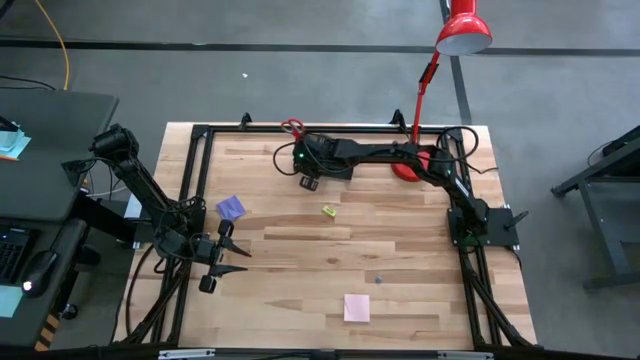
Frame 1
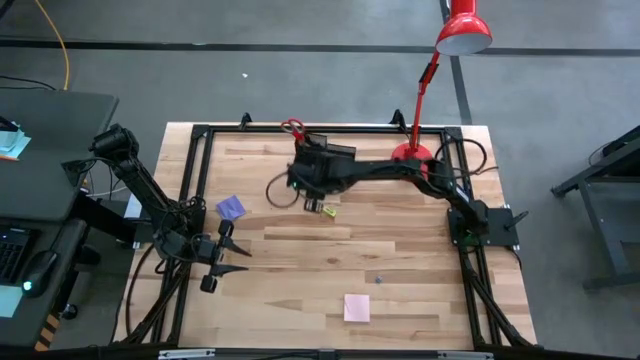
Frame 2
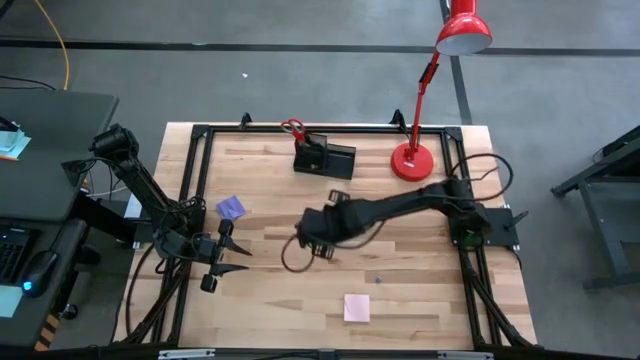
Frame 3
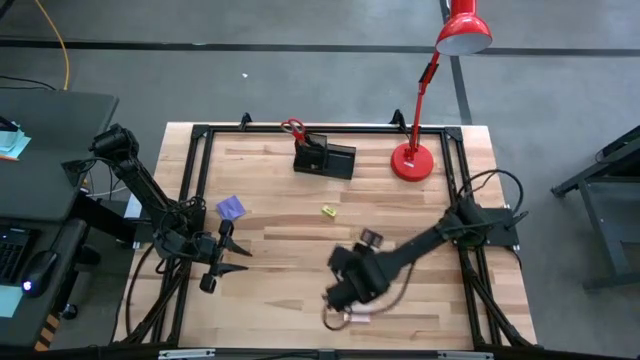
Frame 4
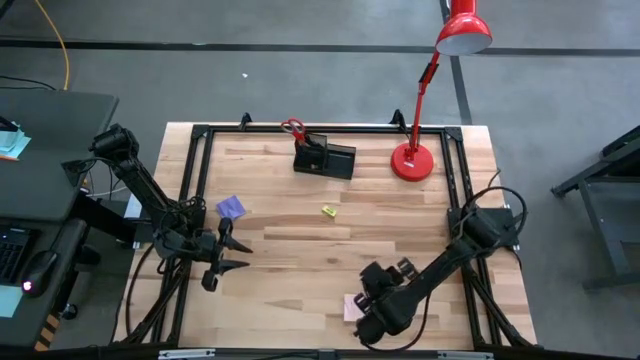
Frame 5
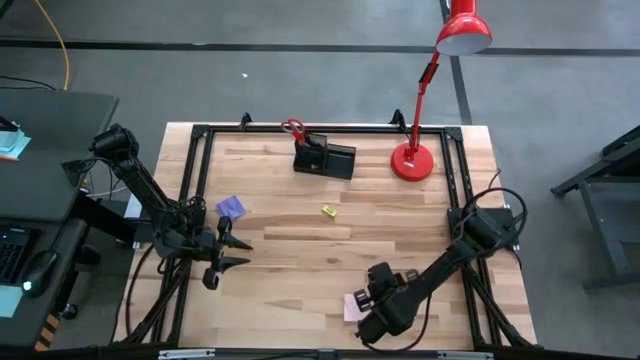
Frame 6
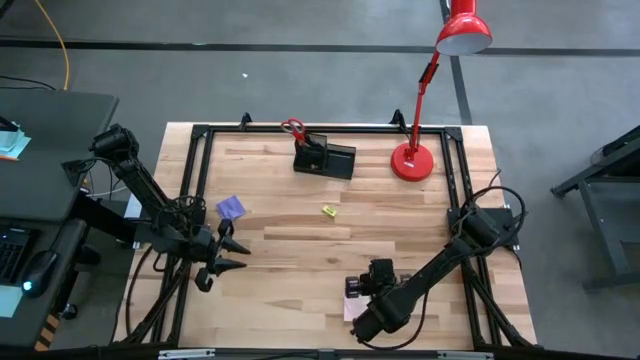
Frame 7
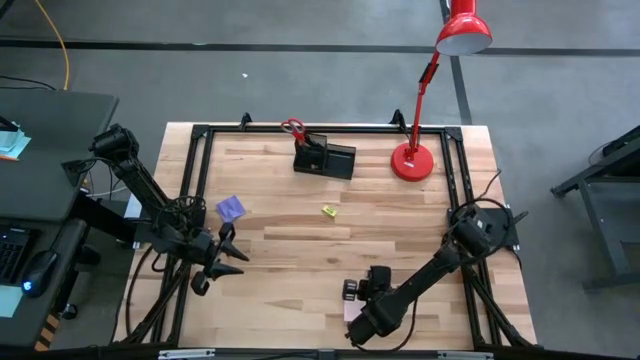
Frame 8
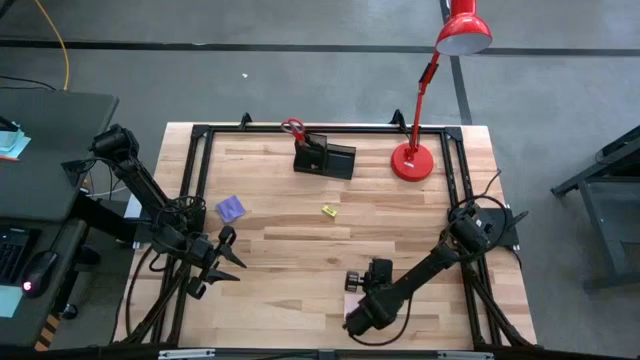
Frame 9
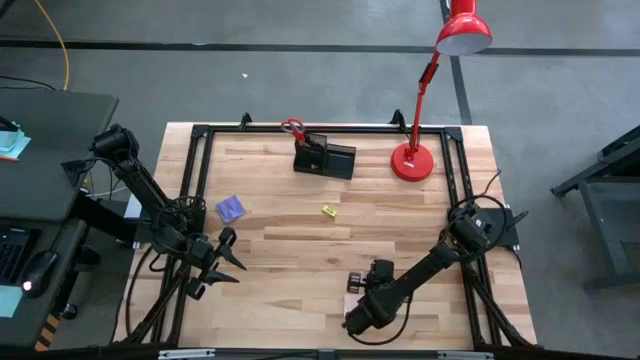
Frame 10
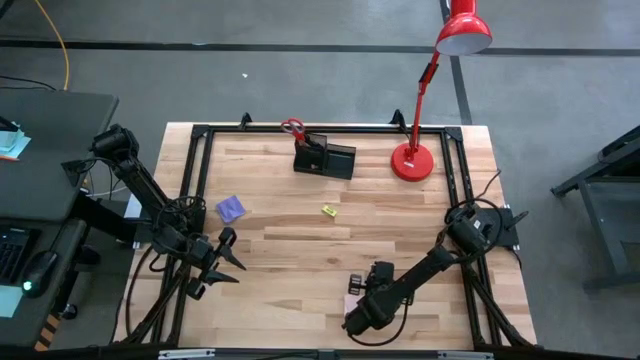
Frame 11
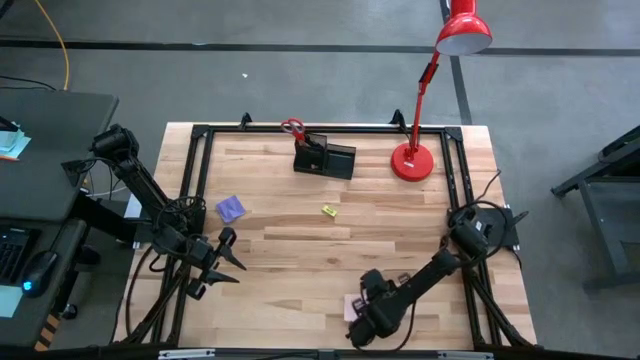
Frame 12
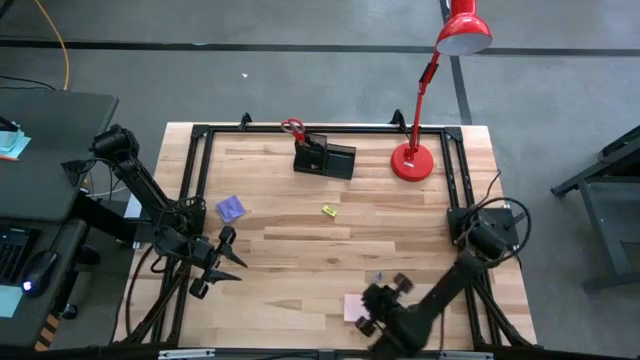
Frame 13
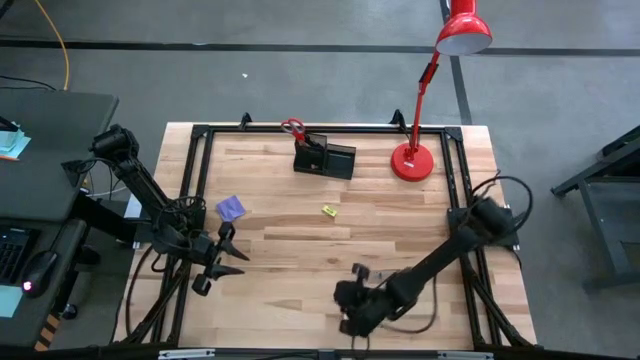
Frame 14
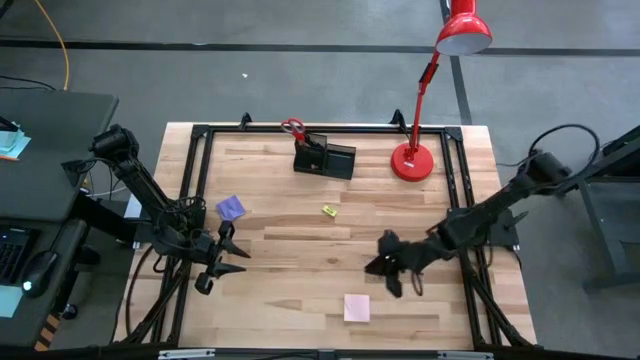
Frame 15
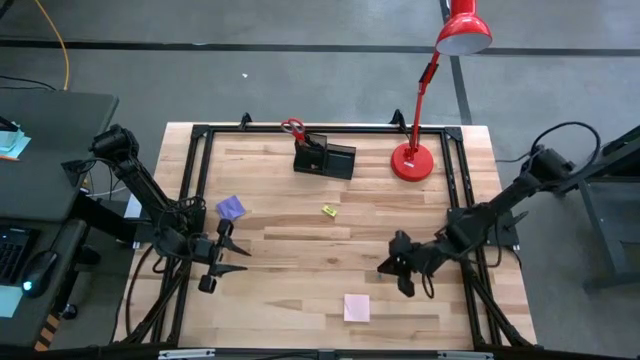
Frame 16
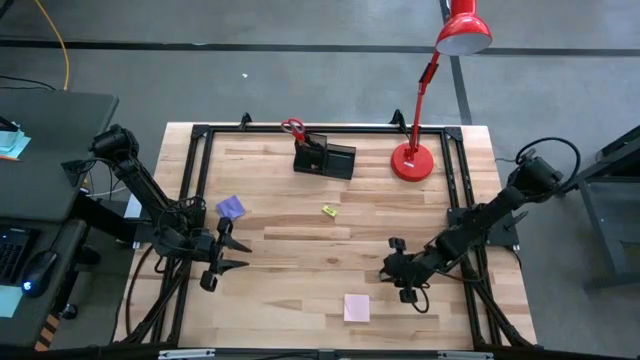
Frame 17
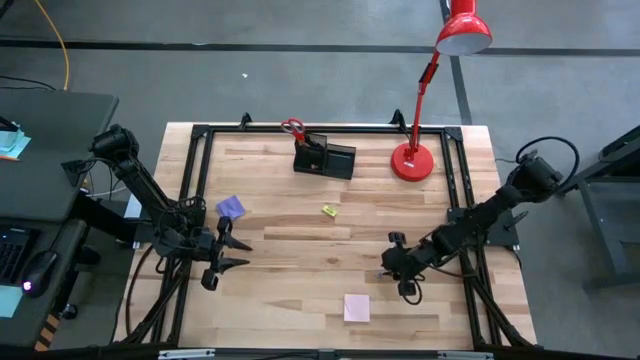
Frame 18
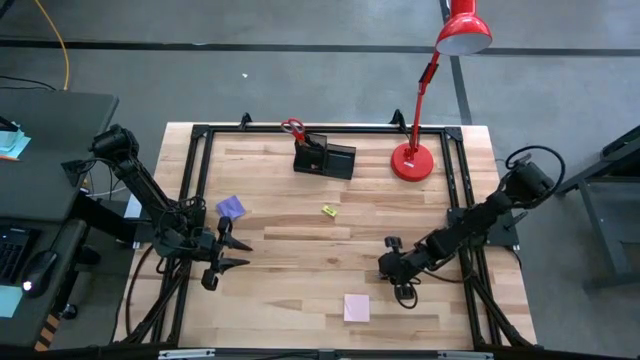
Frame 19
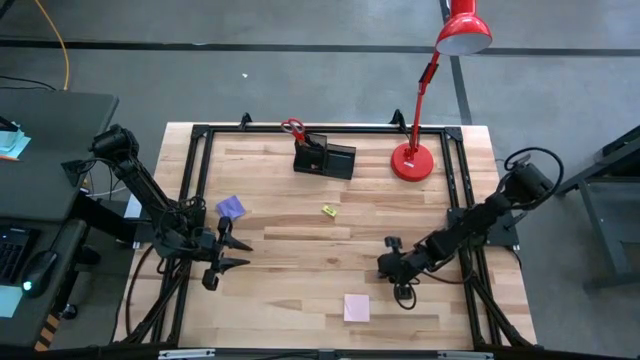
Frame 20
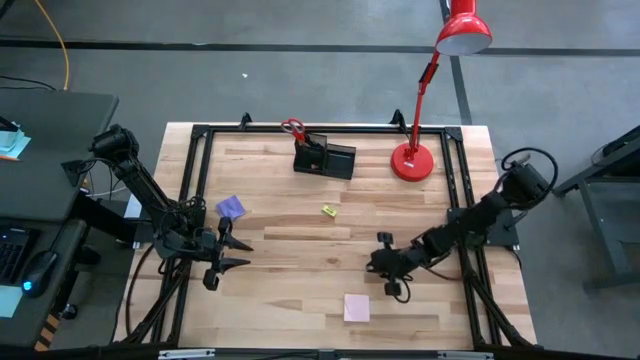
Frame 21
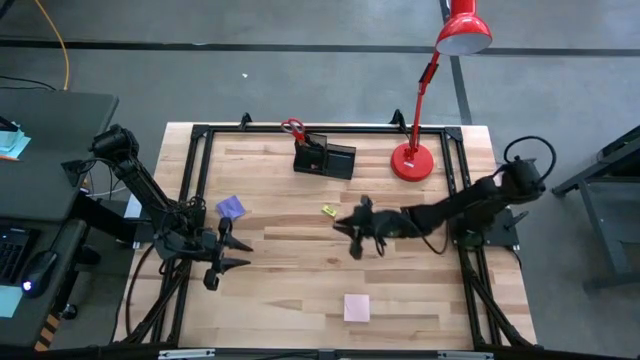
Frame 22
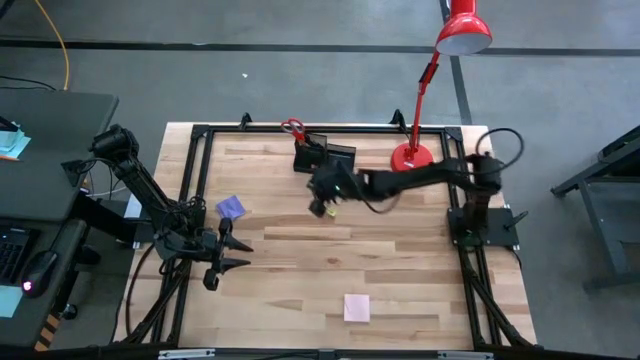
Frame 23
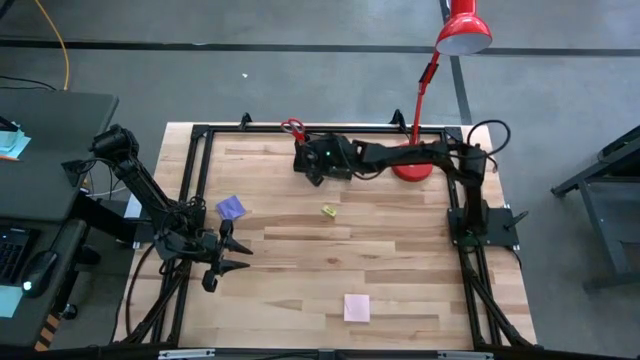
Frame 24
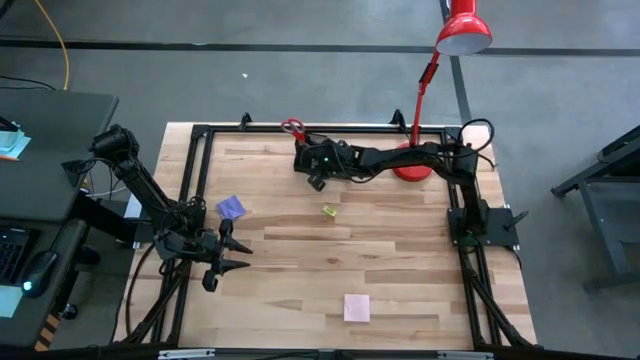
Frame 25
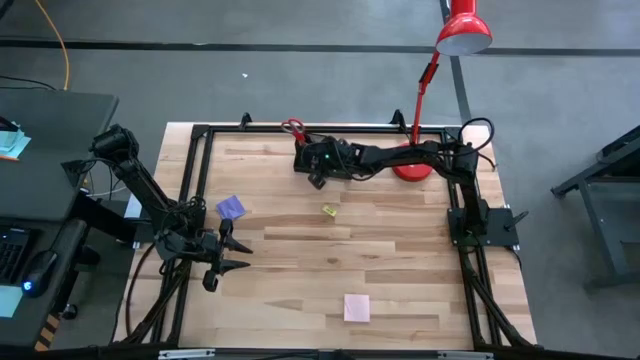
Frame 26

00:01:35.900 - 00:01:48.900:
Task: Pick and place office supplies into organizer
Put the blue clip bender into the desk organizer

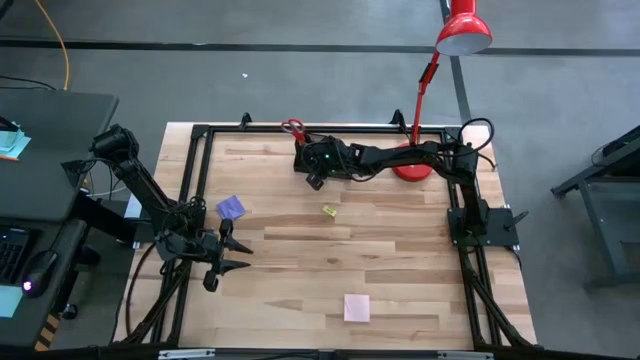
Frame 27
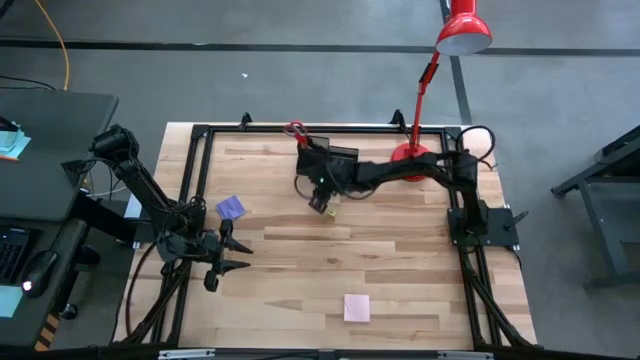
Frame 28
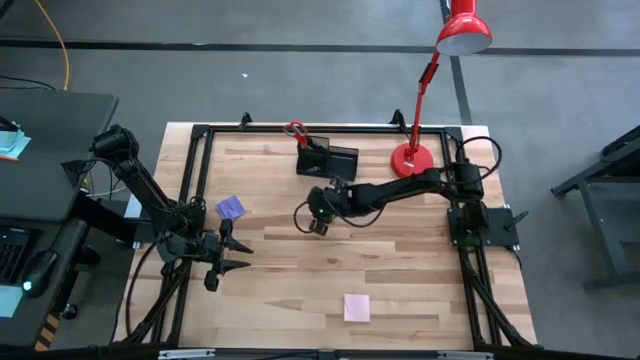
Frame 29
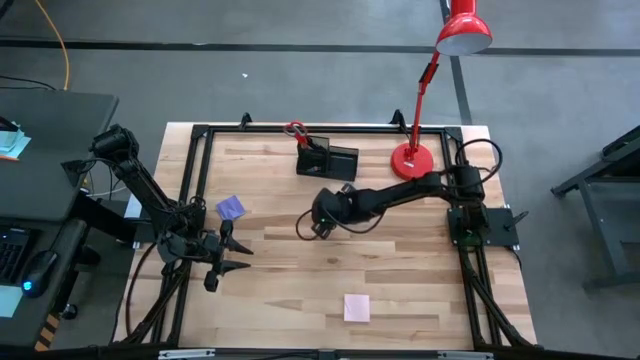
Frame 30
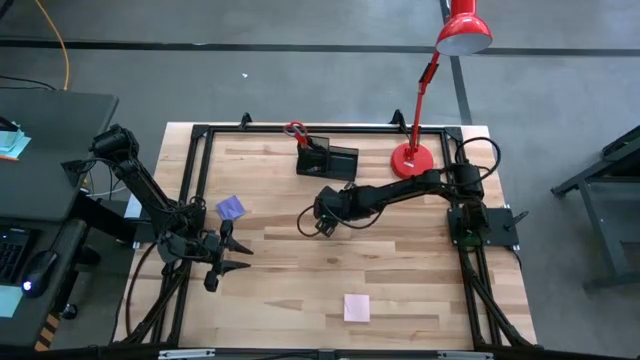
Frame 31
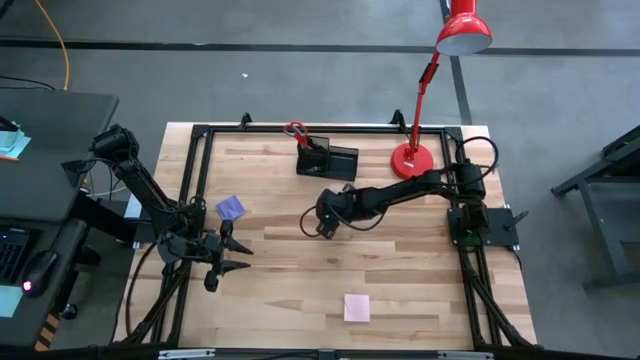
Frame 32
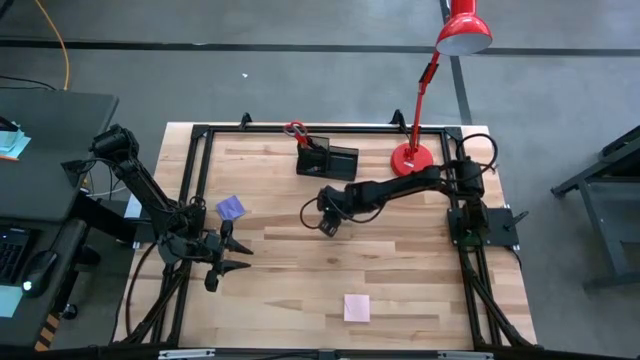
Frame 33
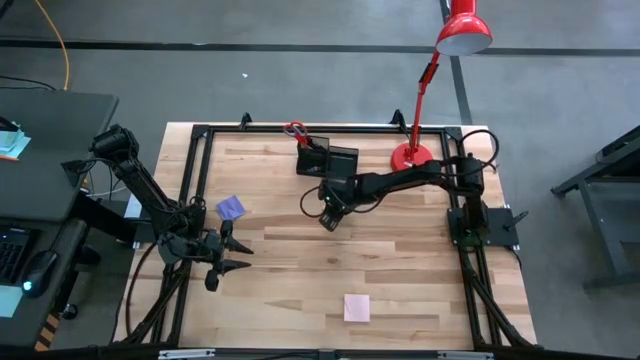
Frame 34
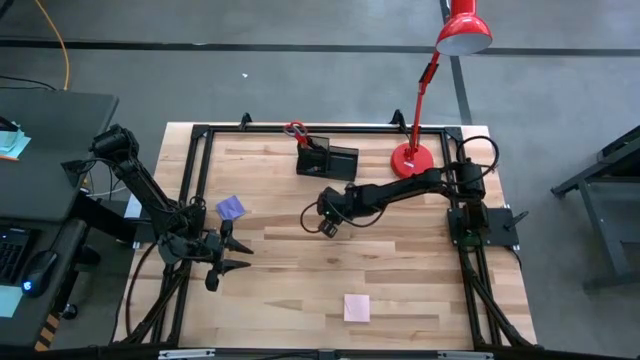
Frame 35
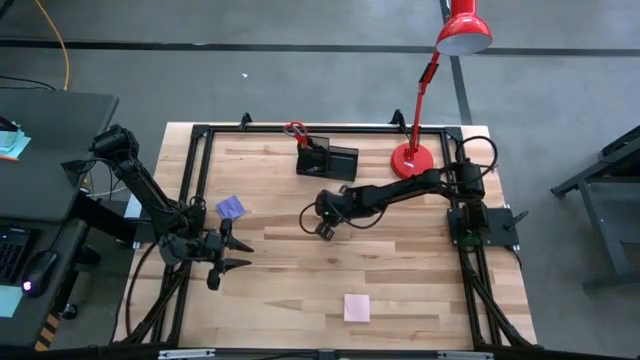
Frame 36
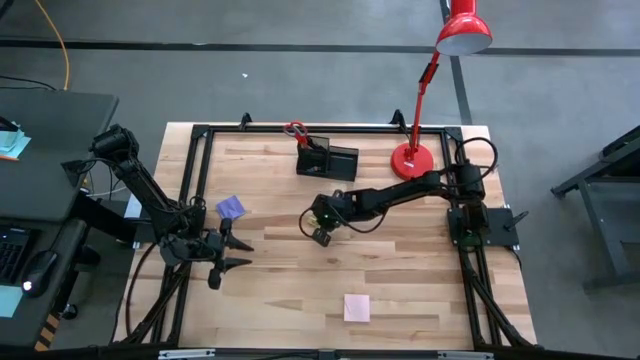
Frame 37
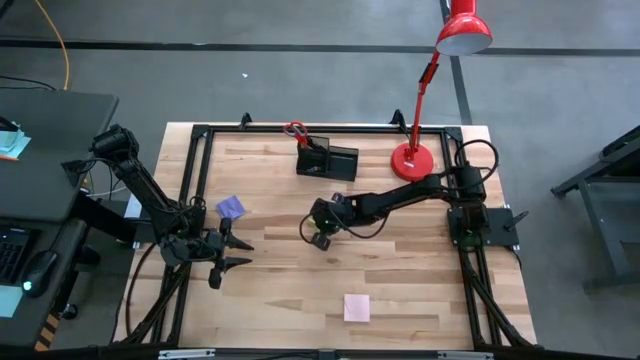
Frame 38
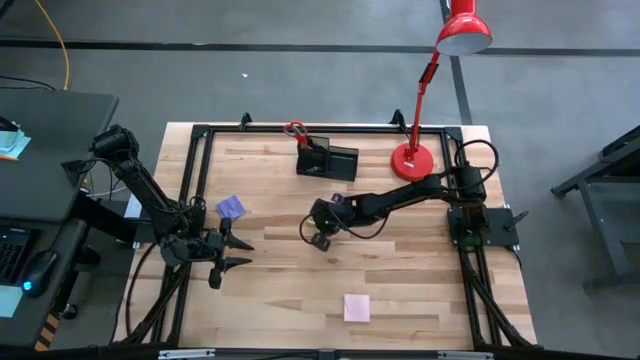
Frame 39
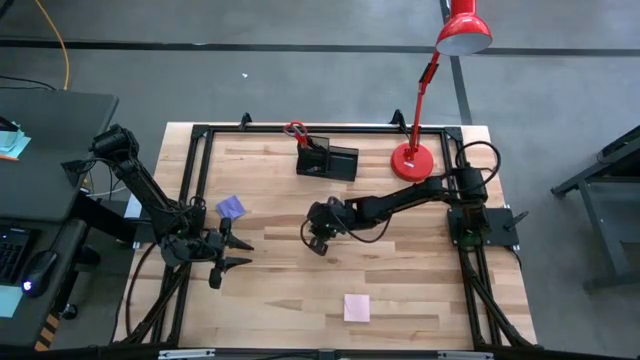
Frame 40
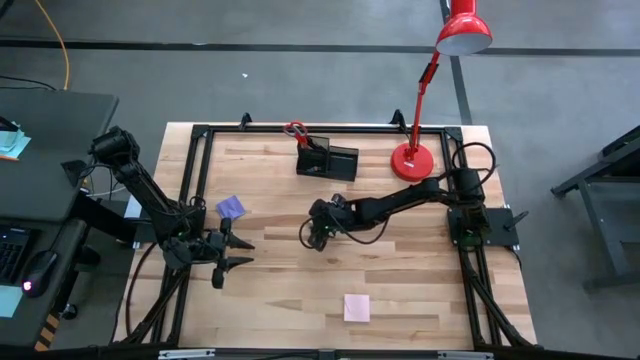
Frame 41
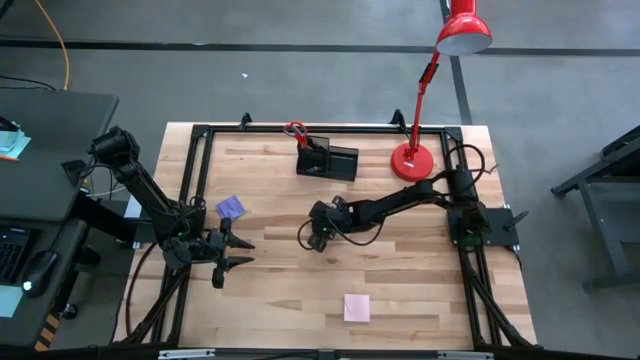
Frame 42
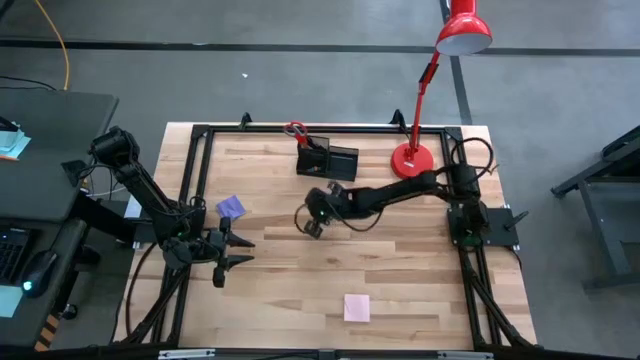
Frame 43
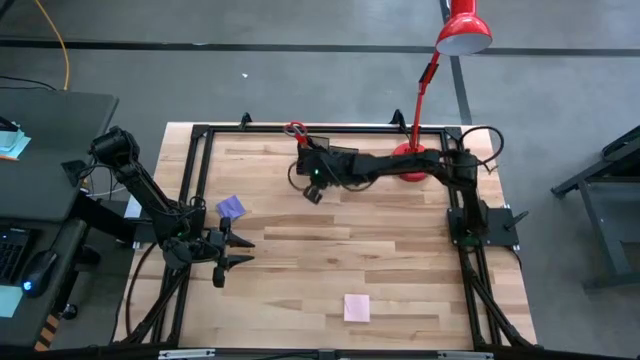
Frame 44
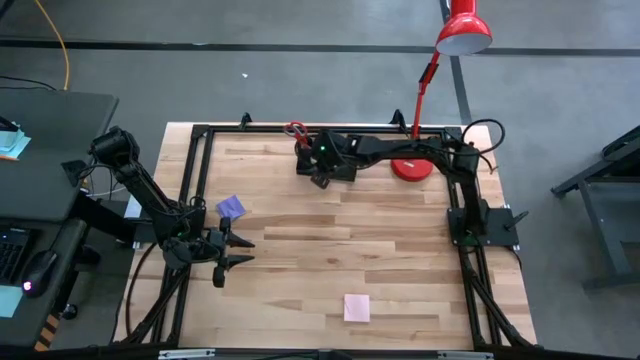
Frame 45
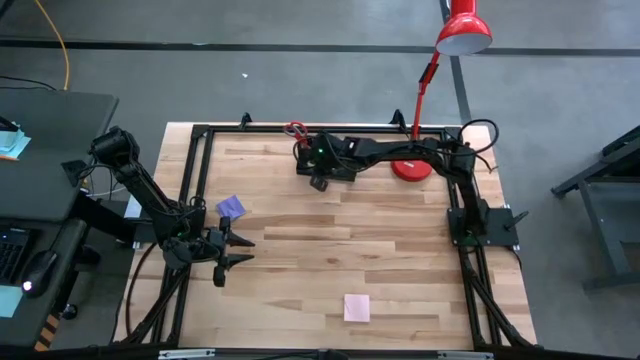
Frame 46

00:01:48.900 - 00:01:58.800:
Put the yellow eraser into the desk organizer
